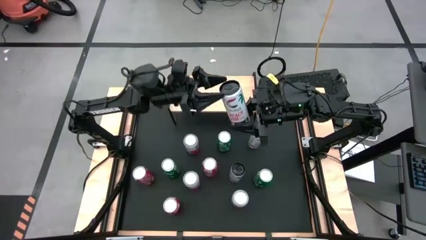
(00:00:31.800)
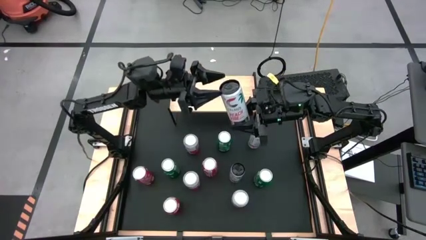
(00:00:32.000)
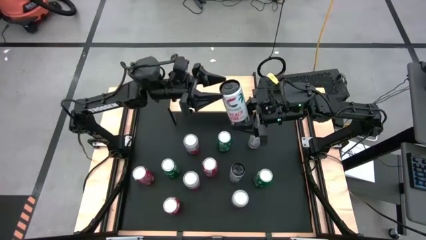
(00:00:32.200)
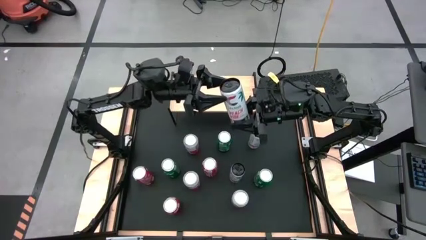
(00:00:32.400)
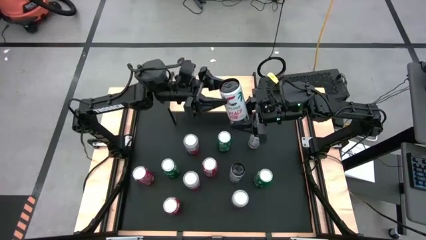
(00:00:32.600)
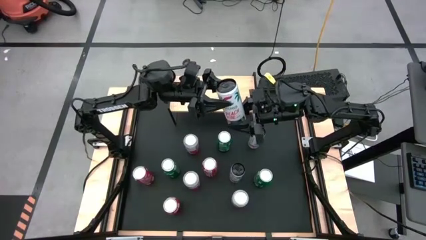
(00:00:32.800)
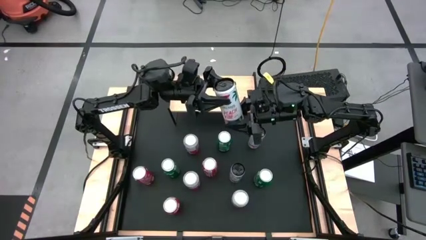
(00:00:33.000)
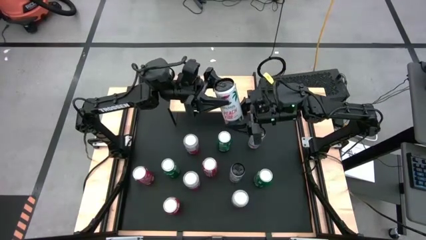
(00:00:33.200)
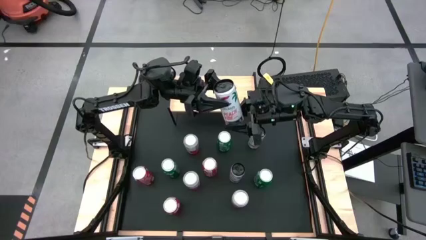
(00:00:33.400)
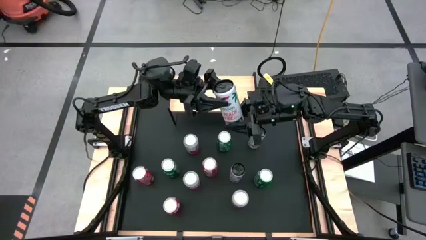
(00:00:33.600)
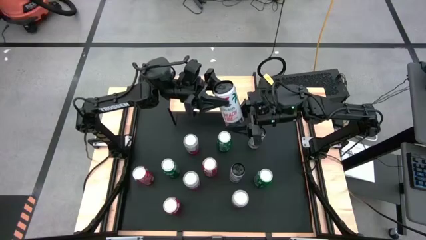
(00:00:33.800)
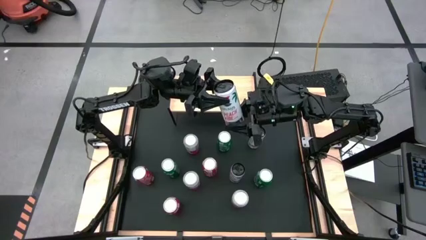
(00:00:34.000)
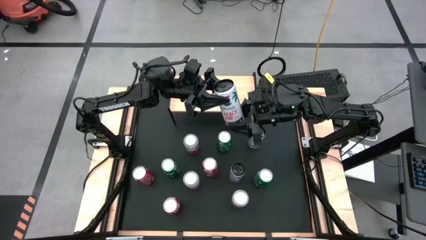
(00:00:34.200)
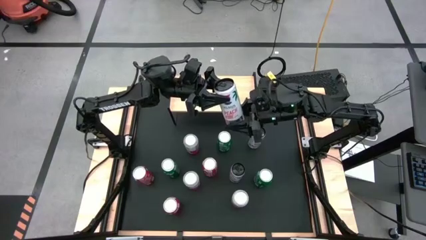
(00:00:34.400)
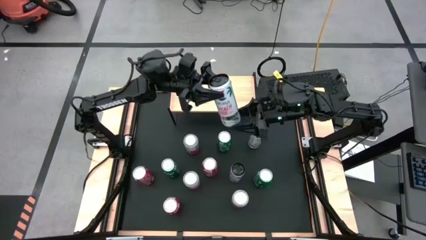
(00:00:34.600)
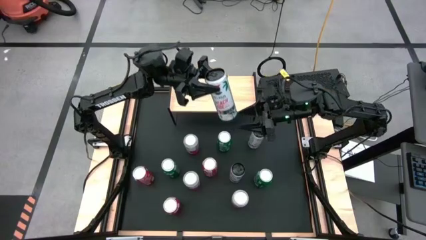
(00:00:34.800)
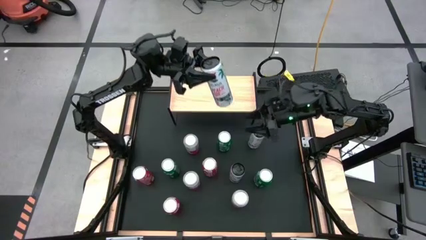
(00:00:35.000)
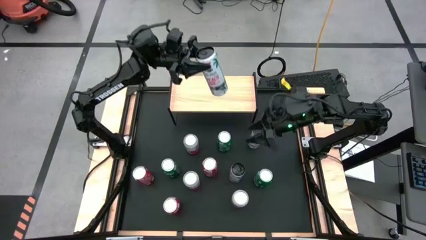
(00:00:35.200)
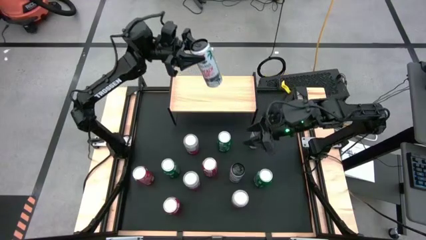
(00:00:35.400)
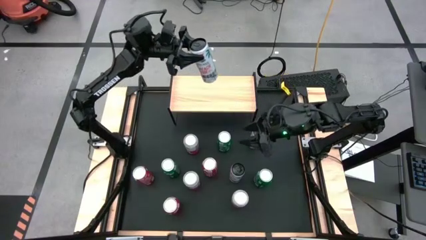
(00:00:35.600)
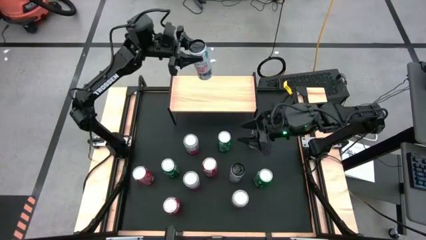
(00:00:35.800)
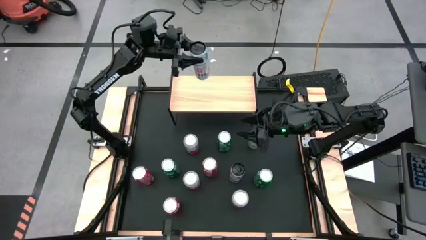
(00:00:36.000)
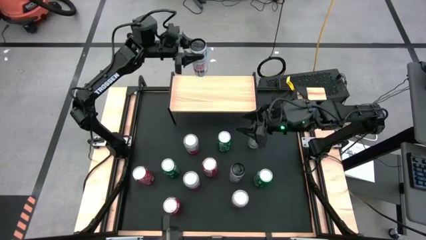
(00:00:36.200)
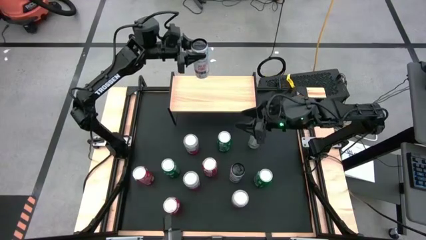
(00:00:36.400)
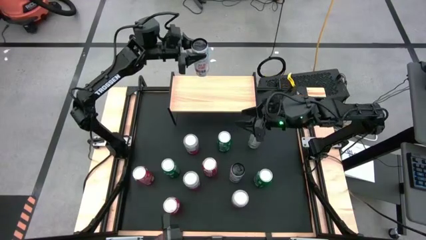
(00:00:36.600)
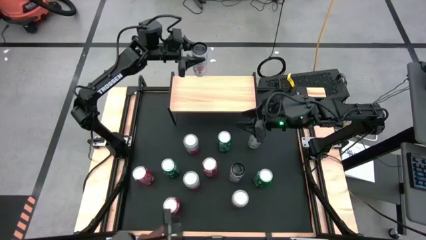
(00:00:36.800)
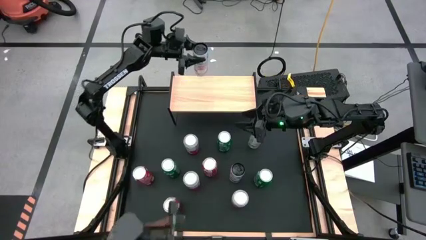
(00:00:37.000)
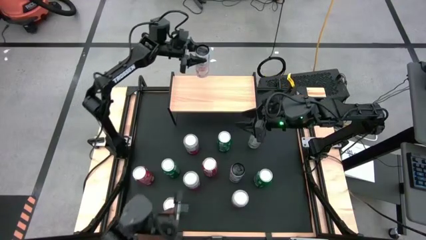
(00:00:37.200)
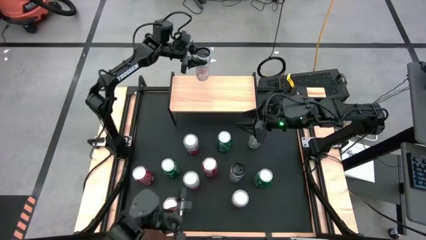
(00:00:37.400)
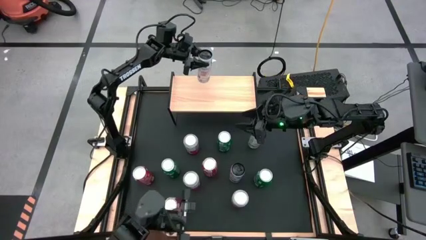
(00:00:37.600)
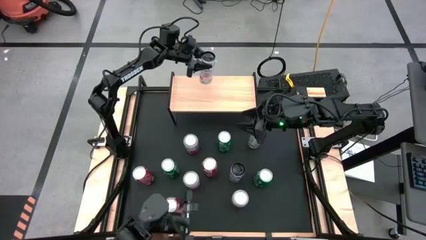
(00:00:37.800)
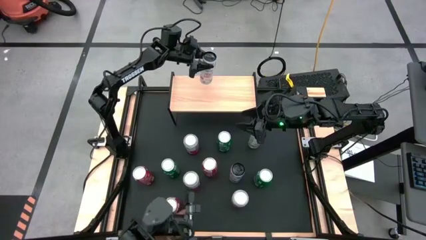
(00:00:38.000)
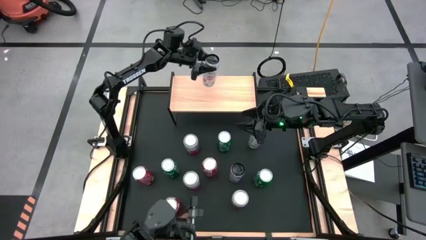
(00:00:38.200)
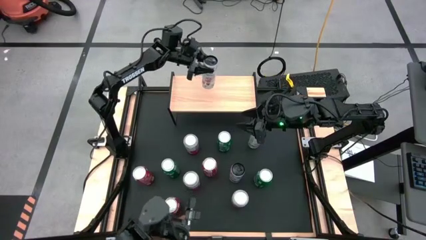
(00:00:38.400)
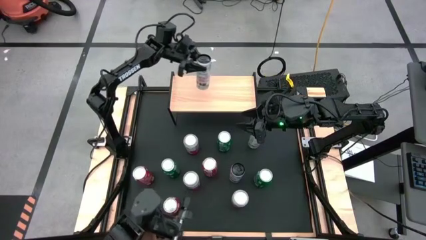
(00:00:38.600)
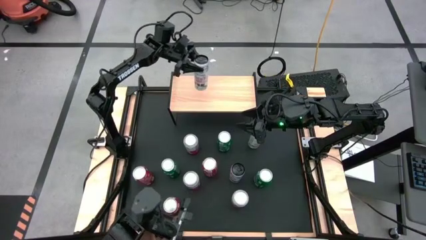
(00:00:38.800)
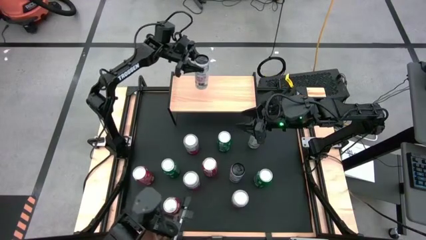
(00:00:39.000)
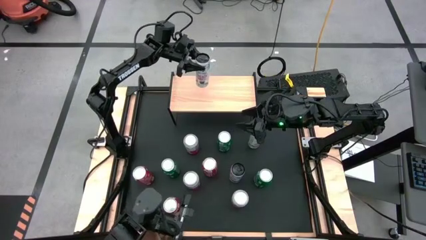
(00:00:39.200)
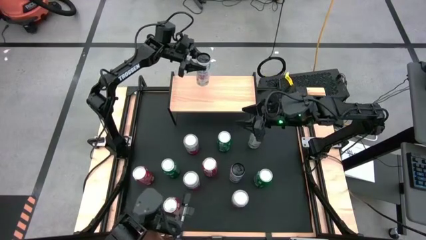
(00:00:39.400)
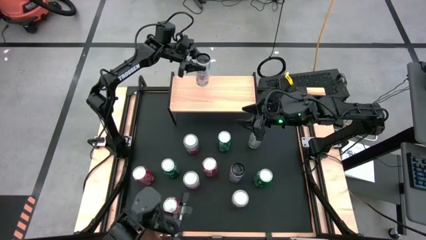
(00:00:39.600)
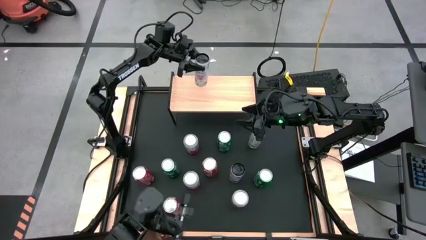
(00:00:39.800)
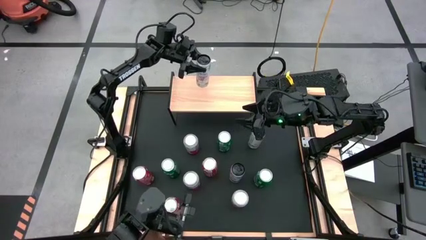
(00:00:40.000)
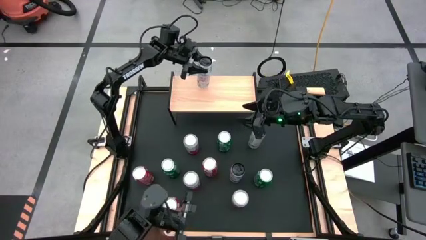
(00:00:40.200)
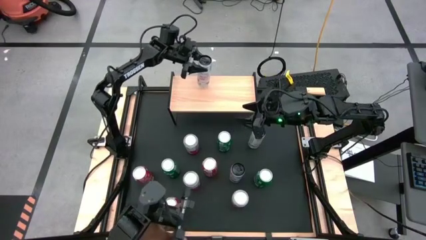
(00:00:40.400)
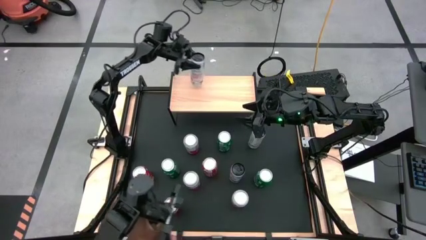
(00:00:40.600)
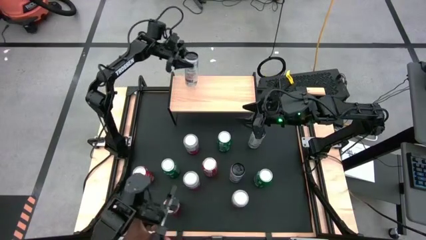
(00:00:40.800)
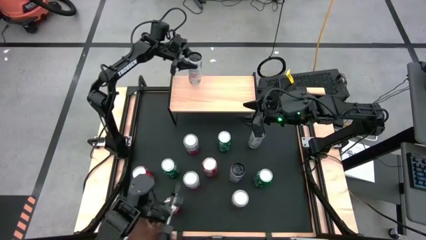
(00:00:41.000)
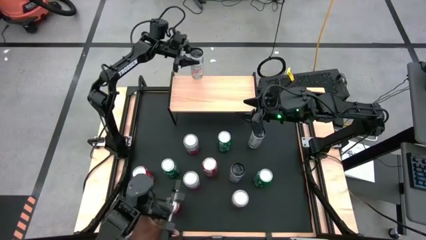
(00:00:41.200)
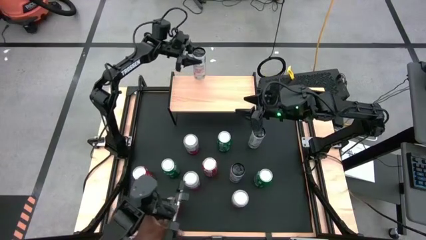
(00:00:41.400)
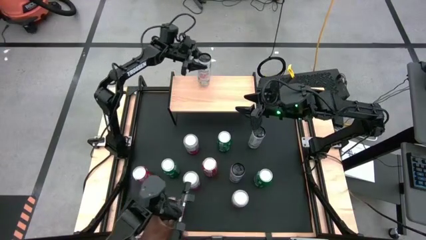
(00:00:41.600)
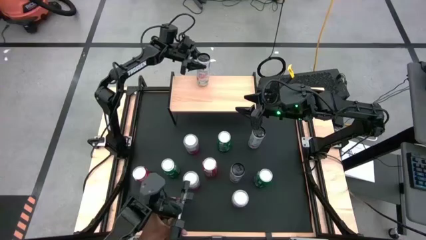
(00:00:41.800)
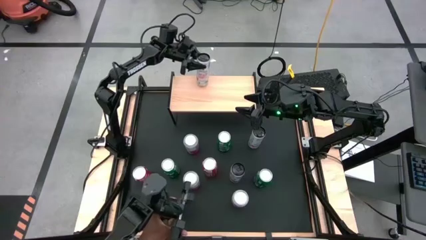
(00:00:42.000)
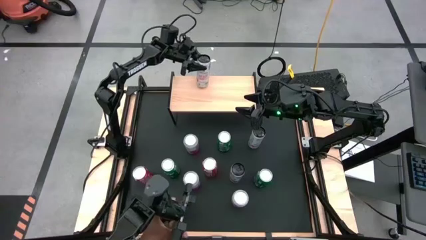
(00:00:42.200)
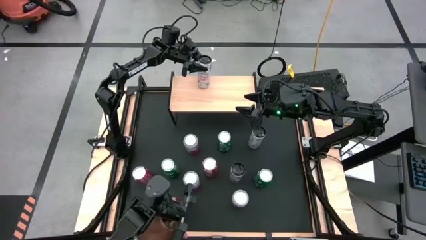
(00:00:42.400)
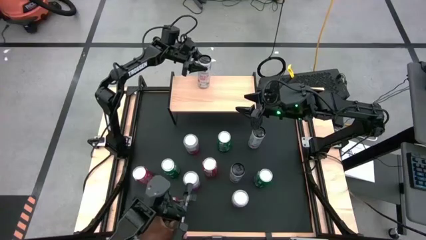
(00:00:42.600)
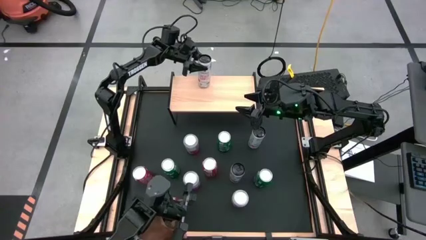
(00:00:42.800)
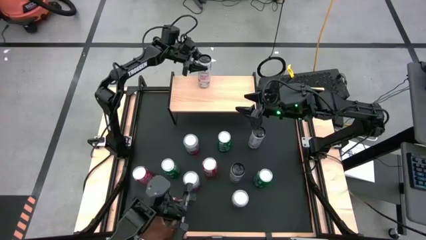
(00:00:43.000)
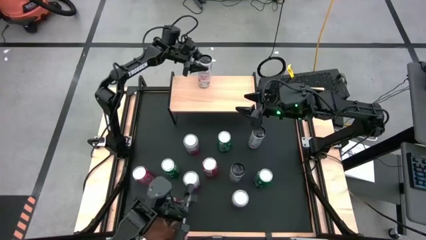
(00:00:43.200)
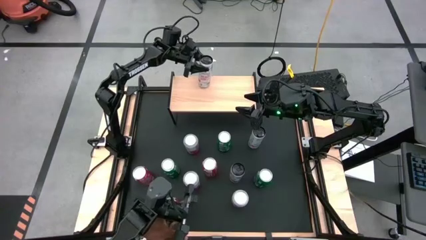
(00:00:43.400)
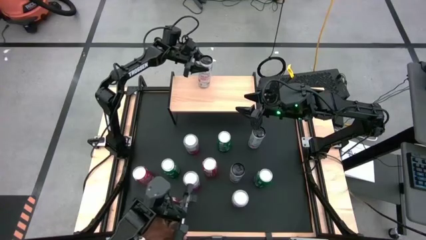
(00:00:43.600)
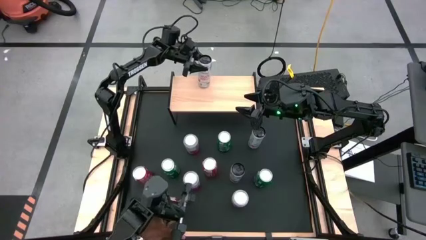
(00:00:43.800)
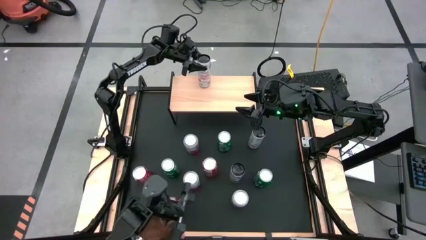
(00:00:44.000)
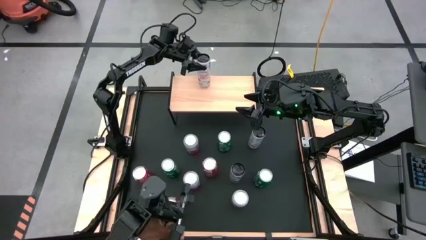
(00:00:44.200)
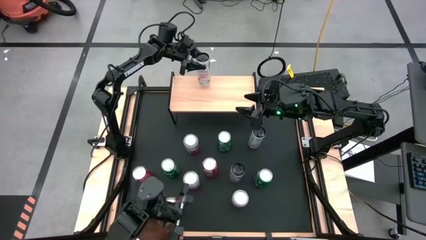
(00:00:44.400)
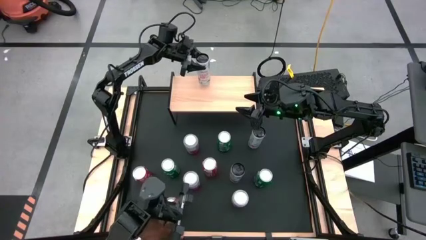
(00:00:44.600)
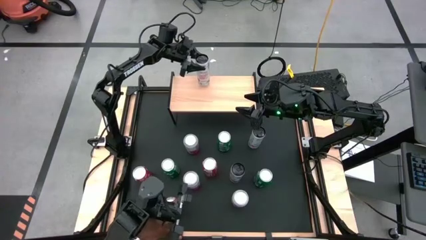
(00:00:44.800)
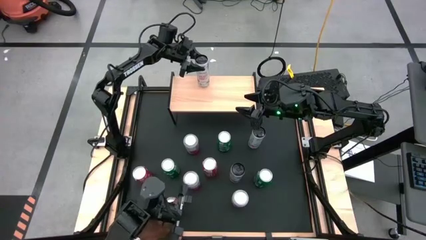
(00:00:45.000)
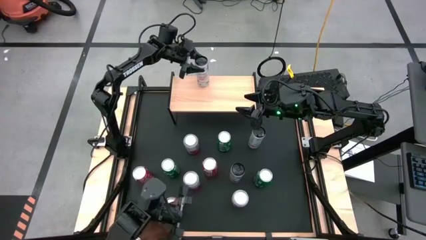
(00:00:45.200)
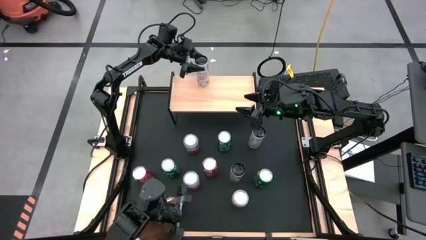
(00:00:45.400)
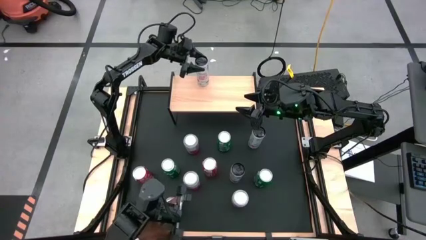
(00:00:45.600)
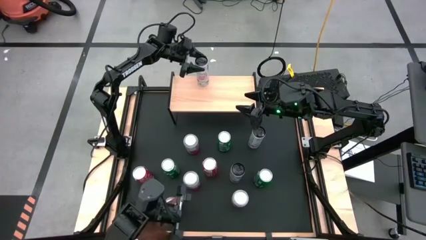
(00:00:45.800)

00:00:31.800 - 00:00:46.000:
Task: Place canned beverage on shelf
Put the bottom right white pink soda can on the shelf
